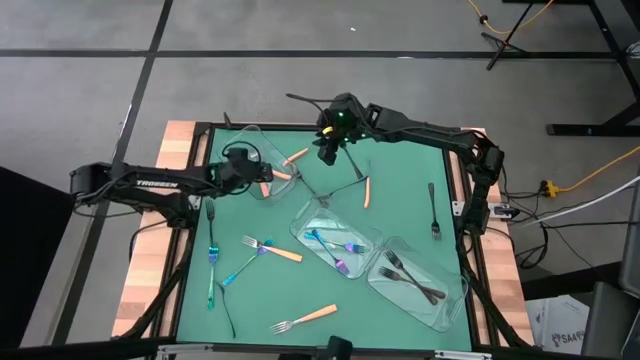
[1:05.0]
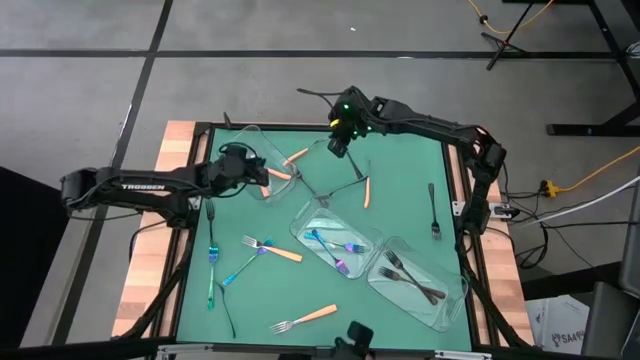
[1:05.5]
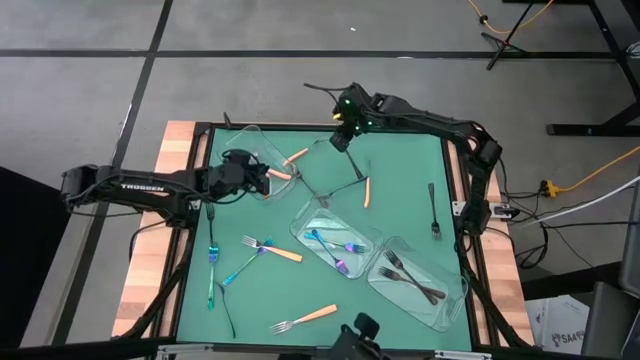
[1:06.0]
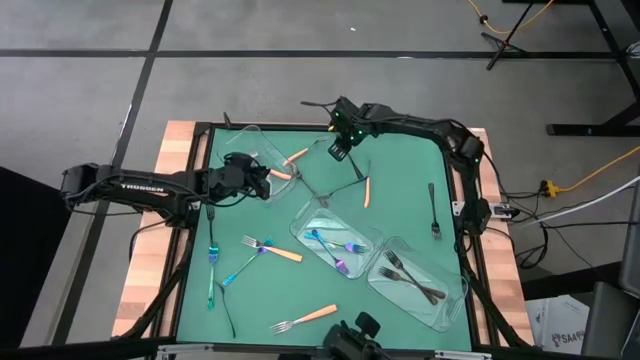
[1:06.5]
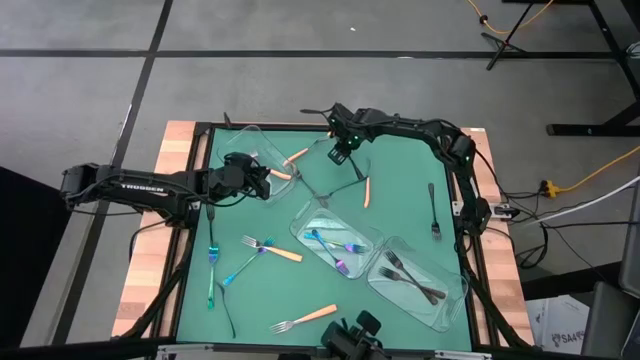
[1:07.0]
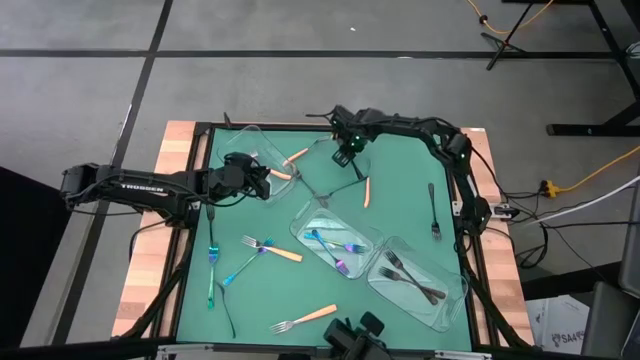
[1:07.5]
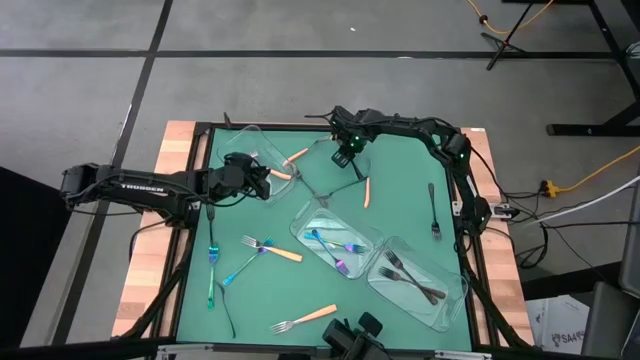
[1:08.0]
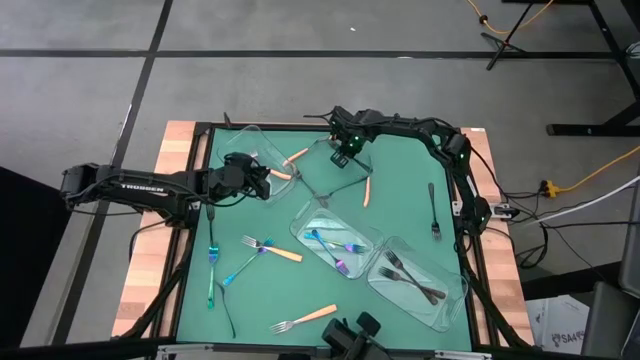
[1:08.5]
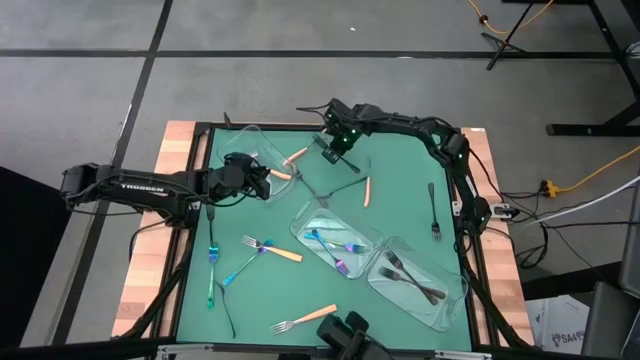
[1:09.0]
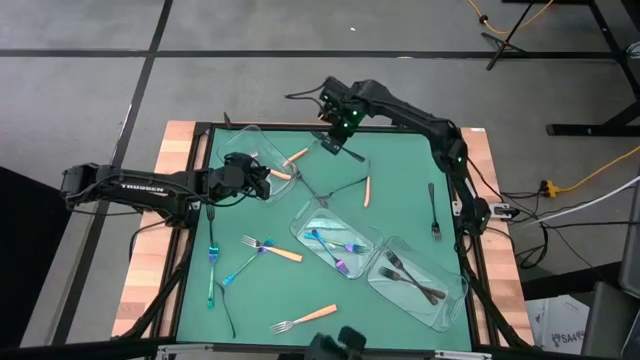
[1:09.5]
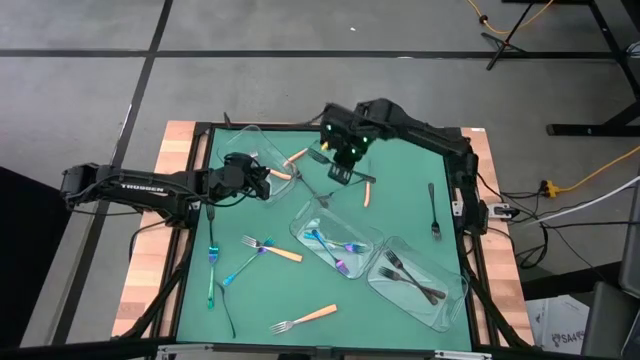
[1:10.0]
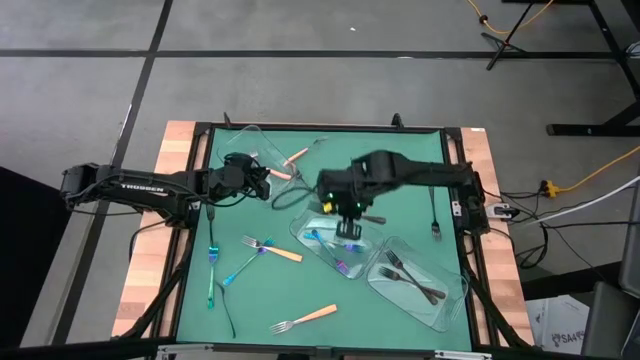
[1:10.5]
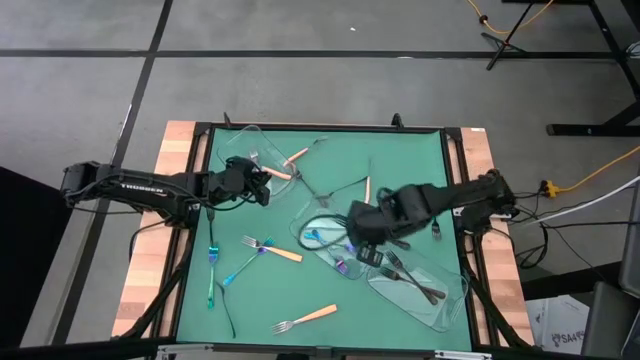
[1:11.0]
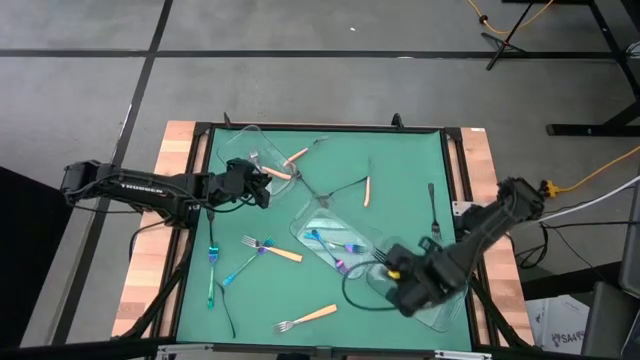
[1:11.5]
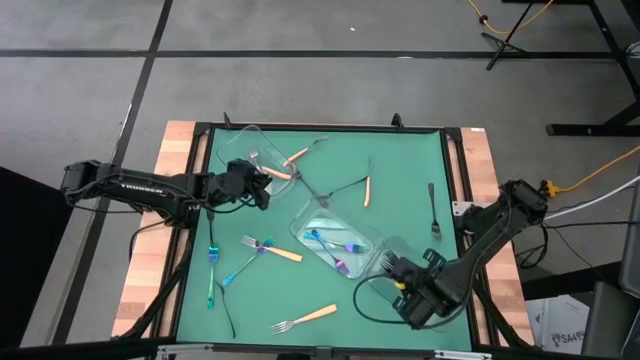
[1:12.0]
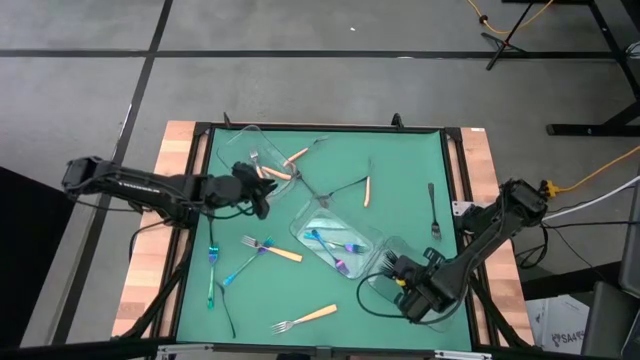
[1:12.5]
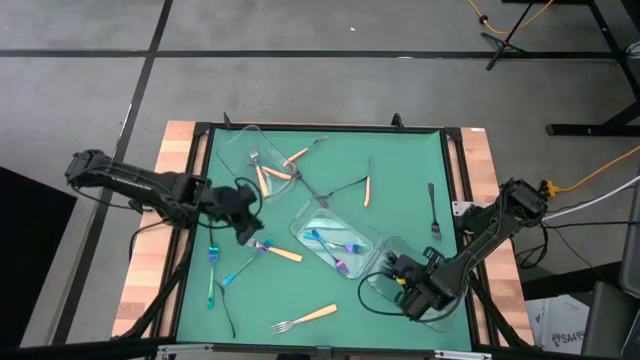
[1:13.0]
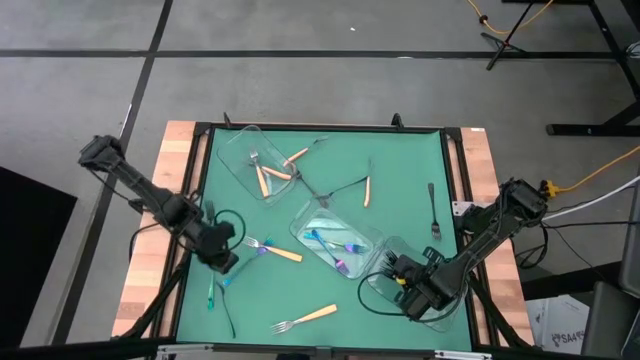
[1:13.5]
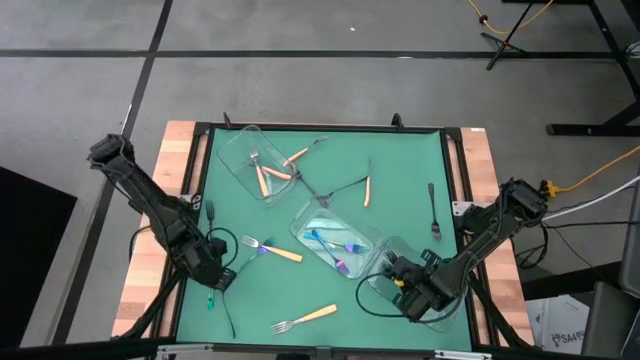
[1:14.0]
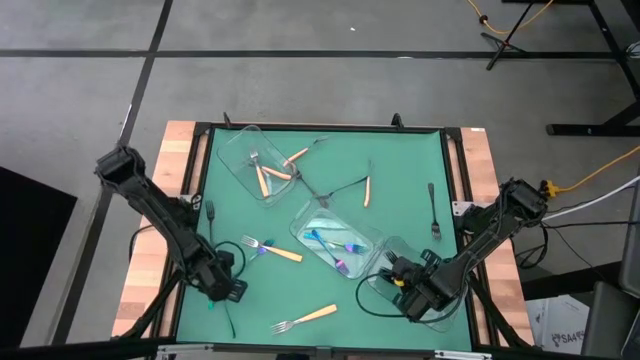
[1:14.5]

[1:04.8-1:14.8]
Task: Sort silverware by color (type)
Put the black fork into the bottom transparent bin

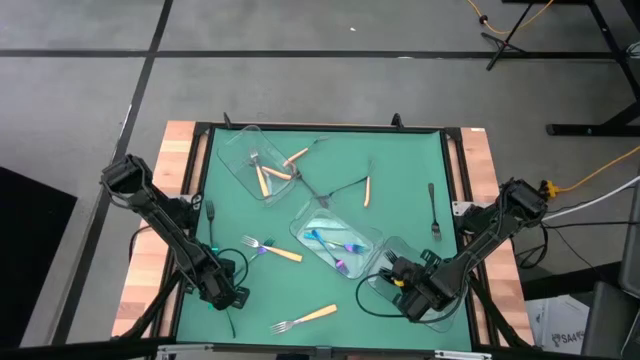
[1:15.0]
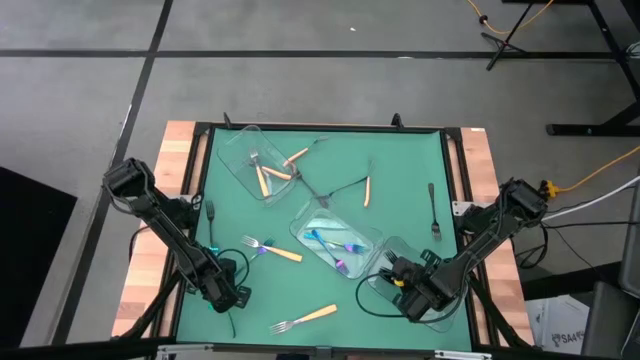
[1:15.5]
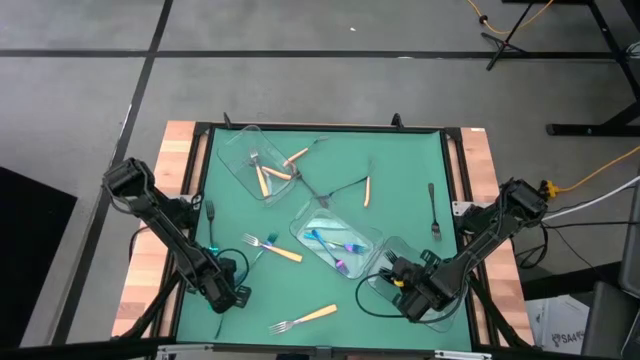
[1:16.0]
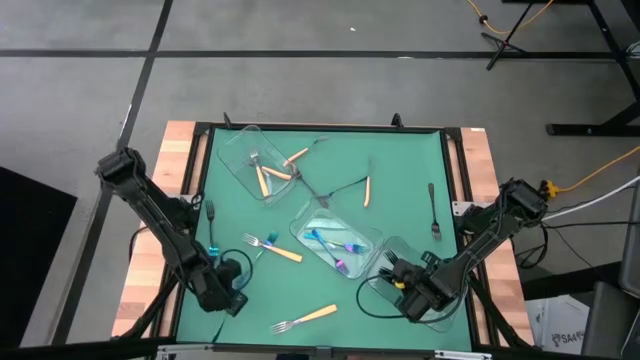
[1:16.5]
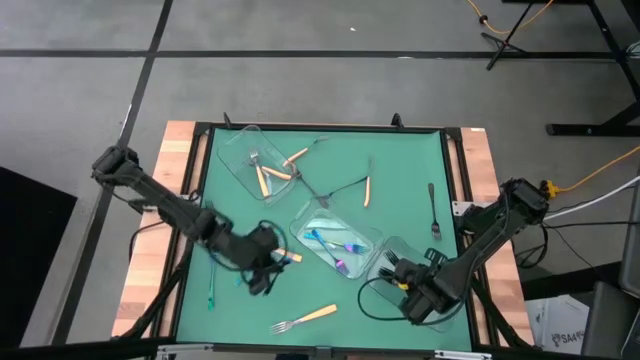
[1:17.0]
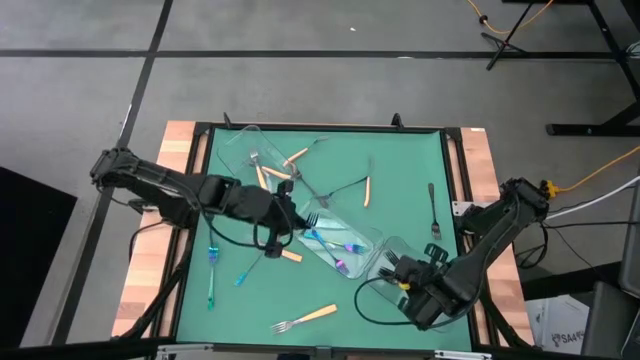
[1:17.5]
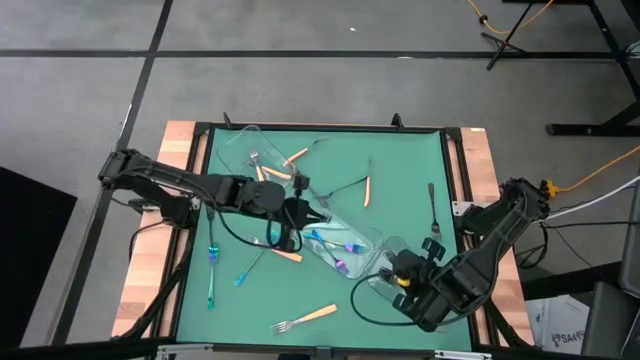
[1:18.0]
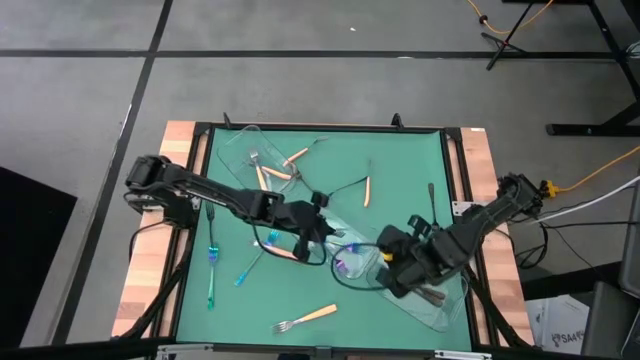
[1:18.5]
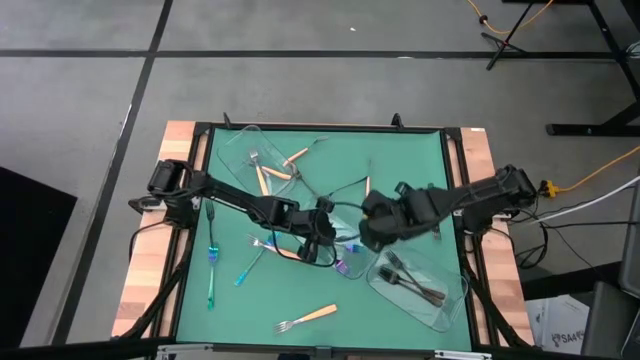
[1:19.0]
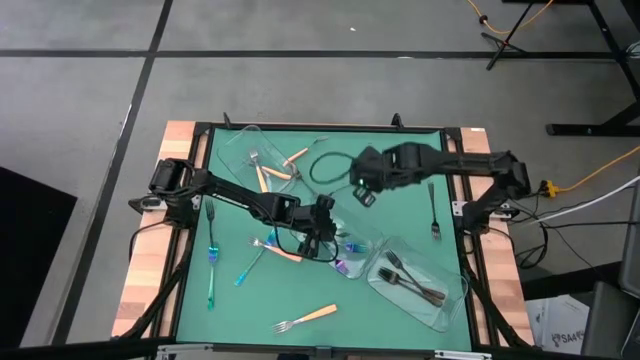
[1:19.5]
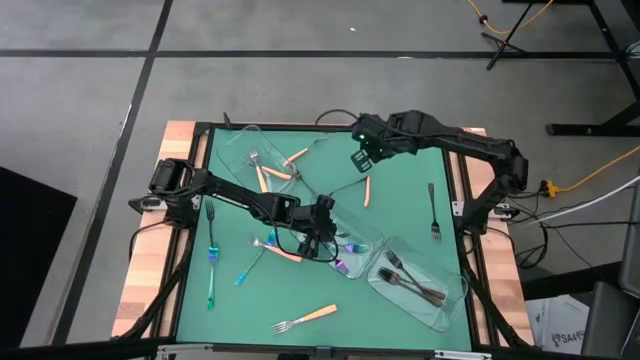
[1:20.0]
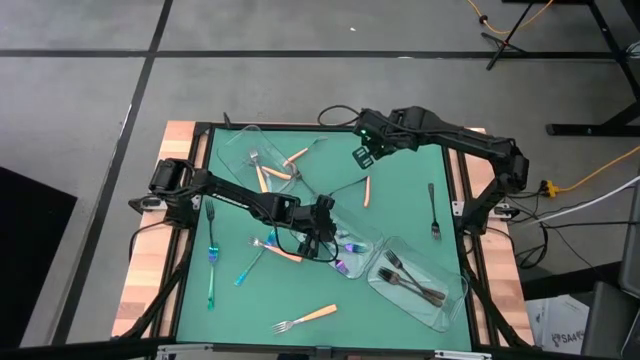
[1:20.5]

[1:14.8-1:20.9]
Put the blue fork into the center transparent bin

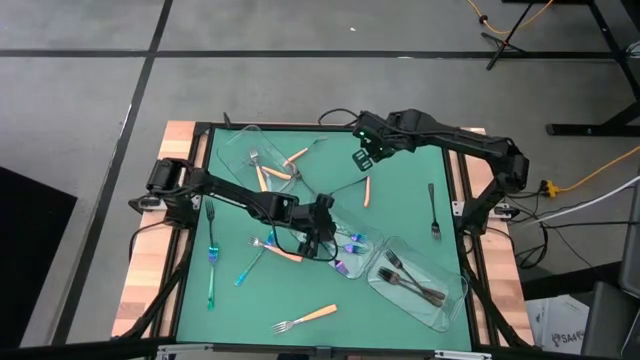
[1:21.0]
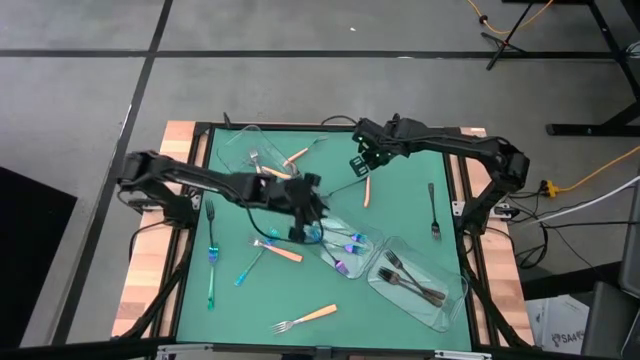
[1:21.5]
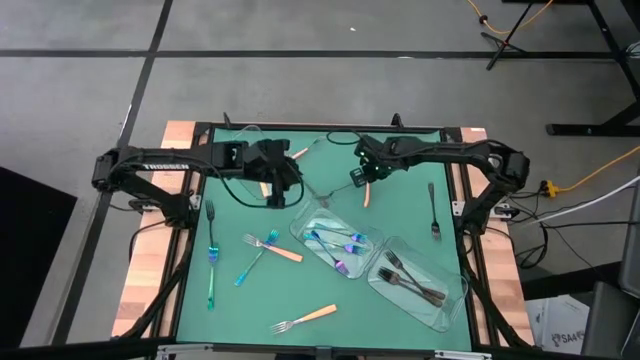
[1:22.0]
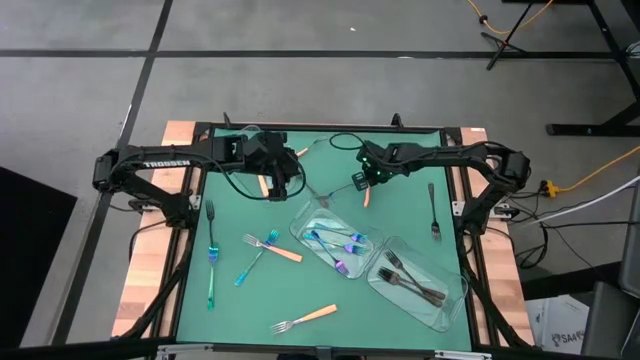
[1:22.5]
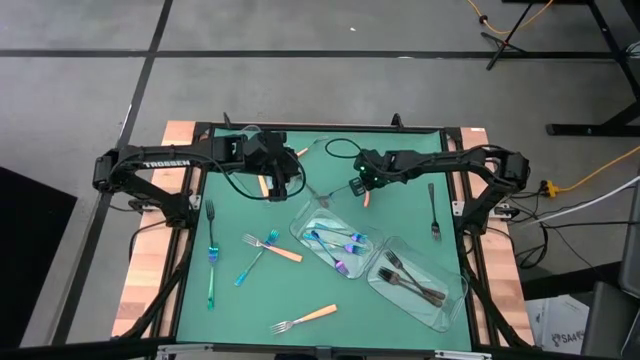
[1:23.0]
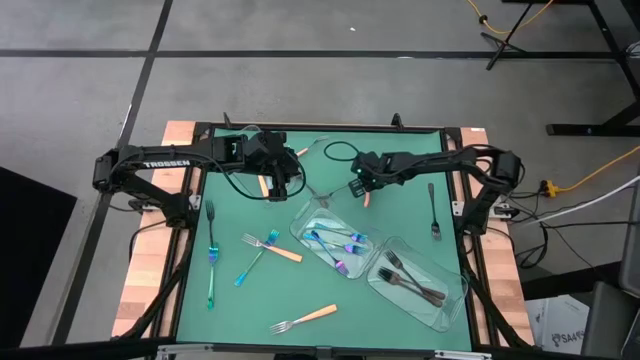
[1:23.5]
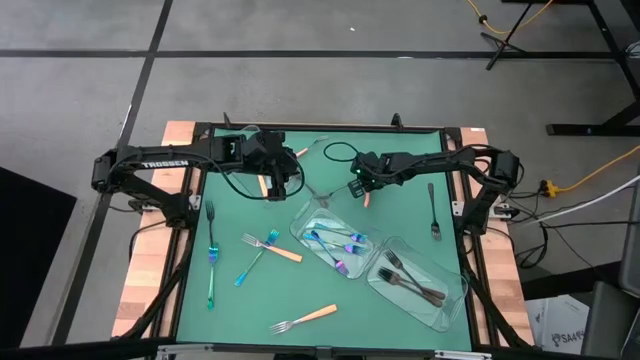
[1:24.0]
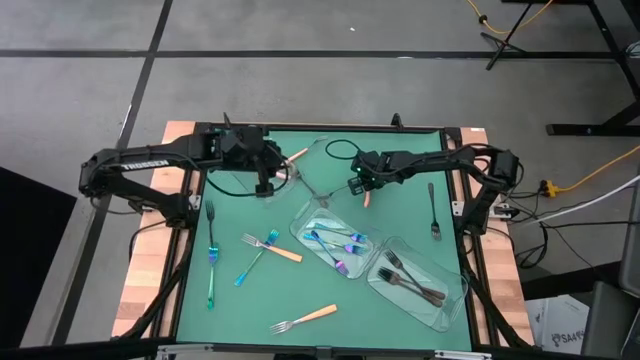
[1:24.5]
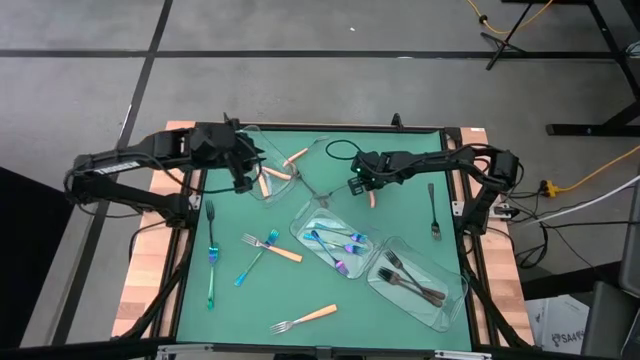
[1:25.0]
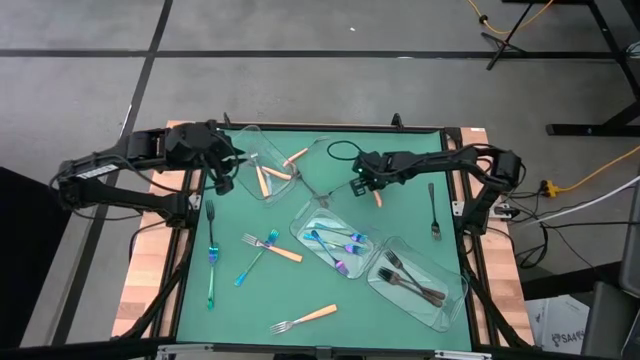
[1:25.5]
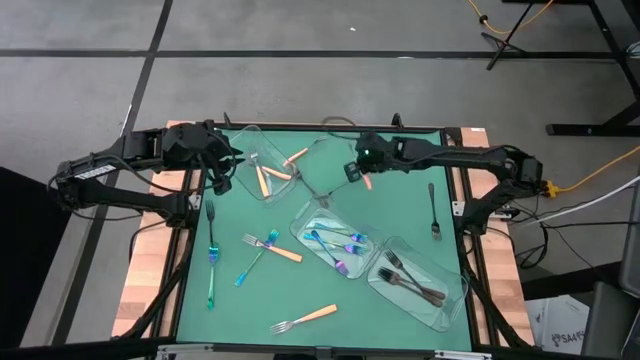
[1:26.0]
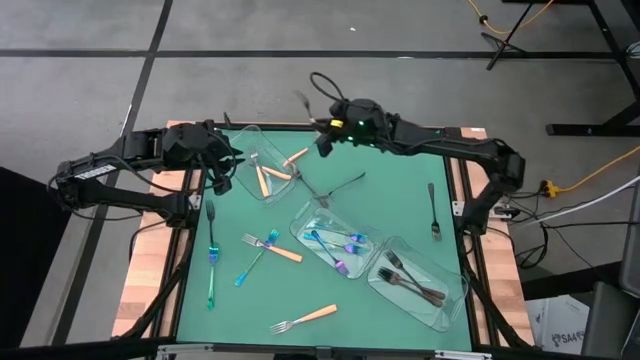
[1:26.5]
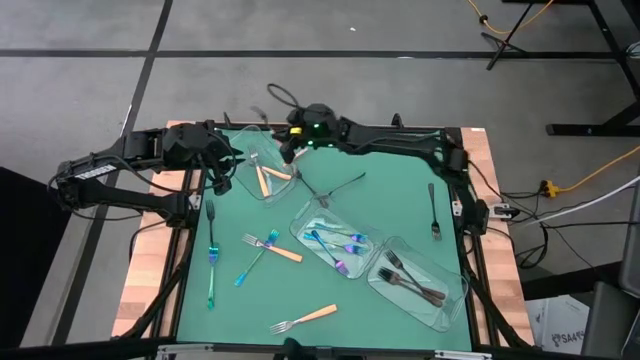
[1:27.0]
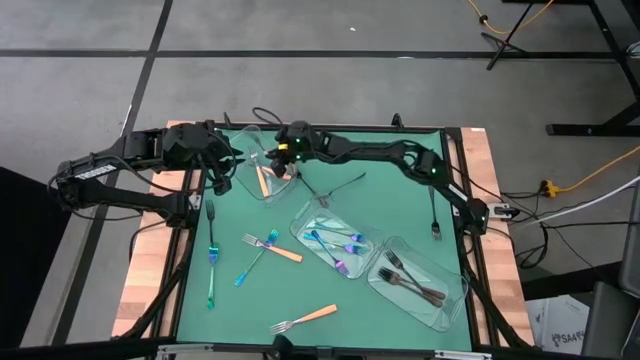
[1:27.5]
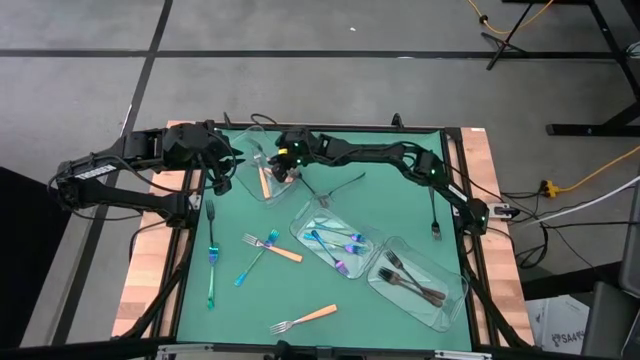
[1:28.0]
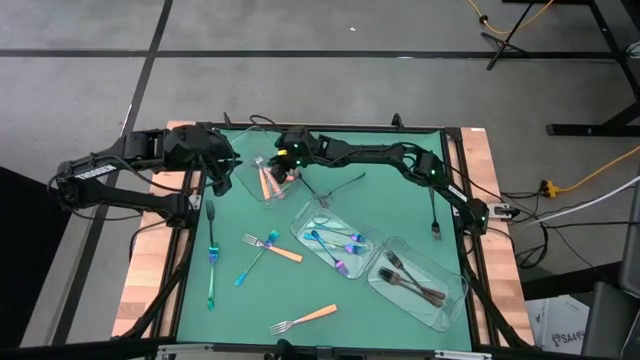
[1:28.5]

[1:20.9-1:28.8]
Put the yellow fork into the top transparent bin
